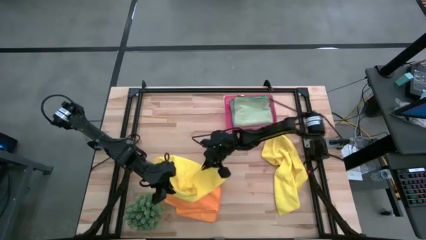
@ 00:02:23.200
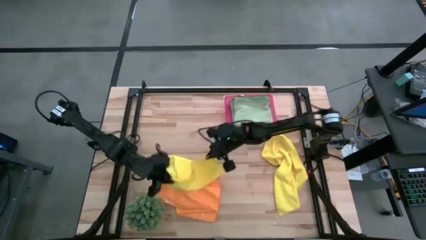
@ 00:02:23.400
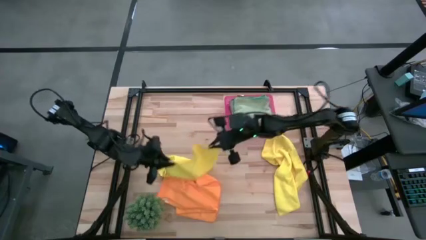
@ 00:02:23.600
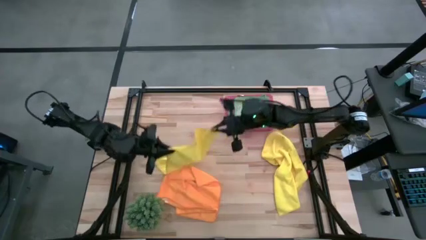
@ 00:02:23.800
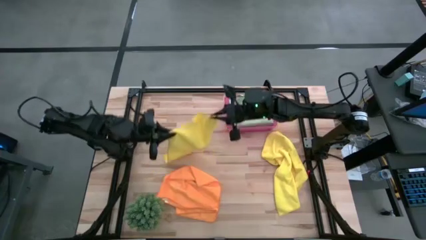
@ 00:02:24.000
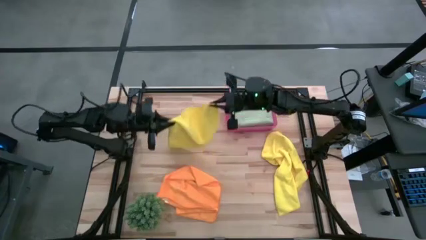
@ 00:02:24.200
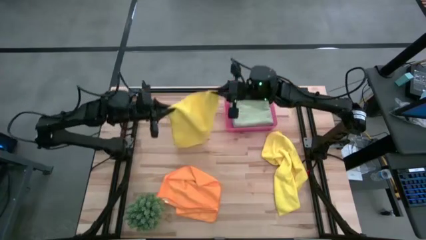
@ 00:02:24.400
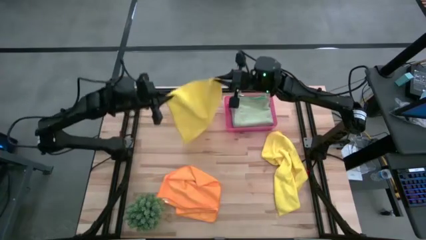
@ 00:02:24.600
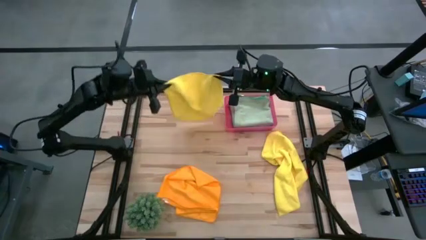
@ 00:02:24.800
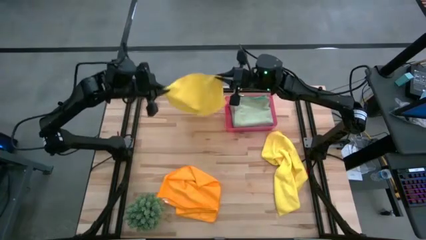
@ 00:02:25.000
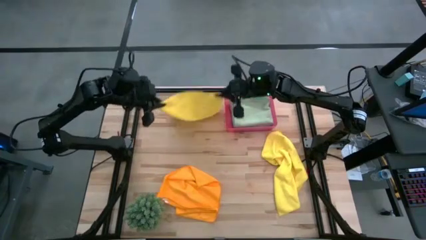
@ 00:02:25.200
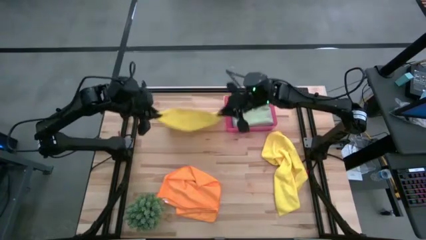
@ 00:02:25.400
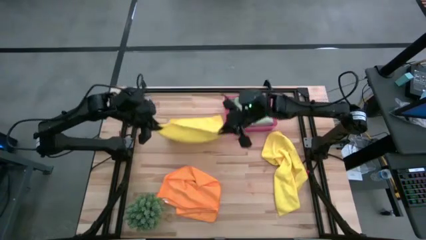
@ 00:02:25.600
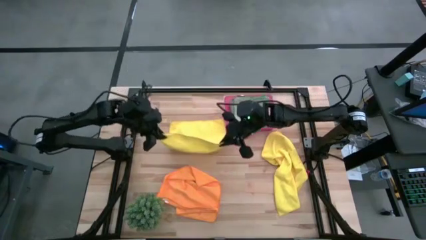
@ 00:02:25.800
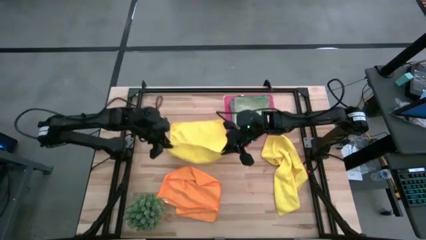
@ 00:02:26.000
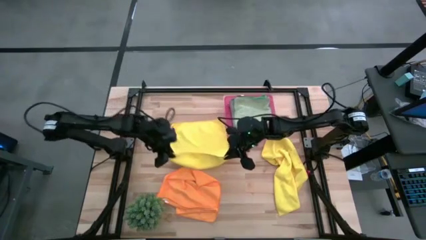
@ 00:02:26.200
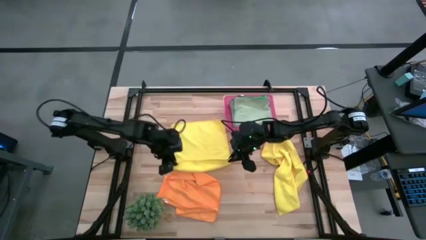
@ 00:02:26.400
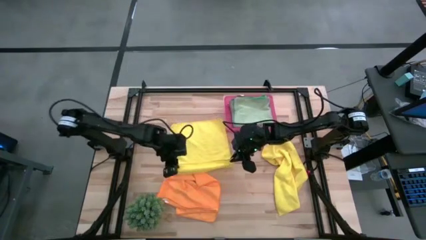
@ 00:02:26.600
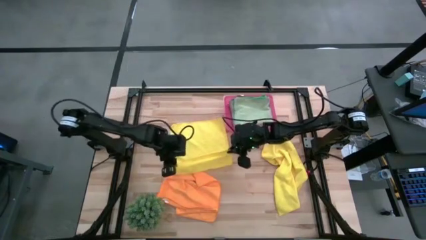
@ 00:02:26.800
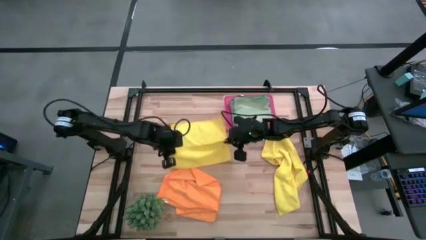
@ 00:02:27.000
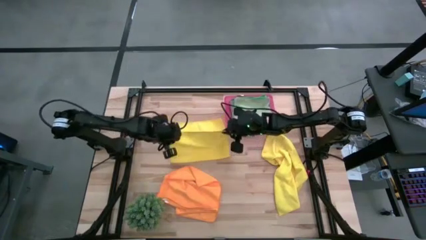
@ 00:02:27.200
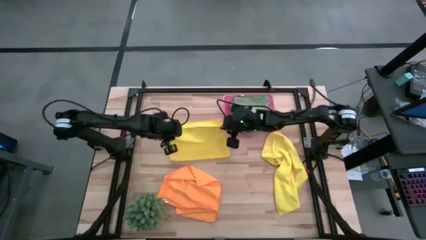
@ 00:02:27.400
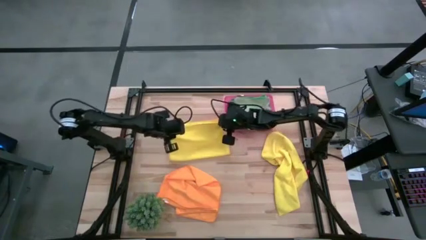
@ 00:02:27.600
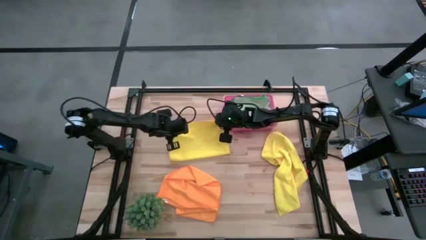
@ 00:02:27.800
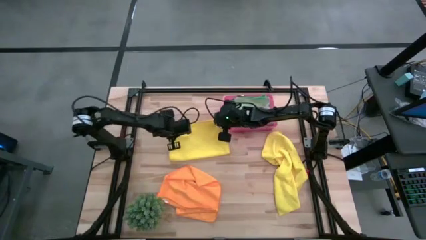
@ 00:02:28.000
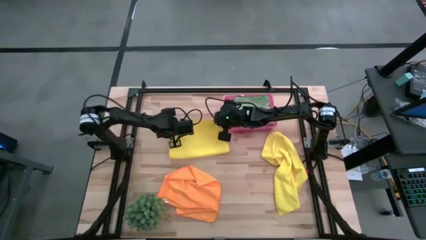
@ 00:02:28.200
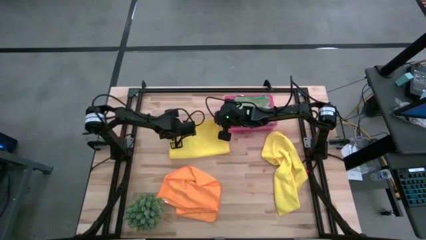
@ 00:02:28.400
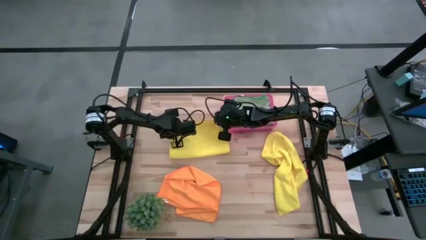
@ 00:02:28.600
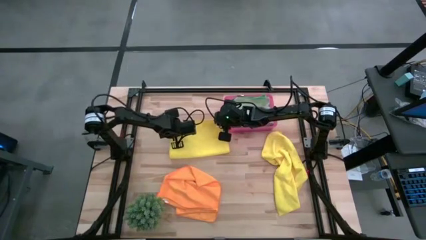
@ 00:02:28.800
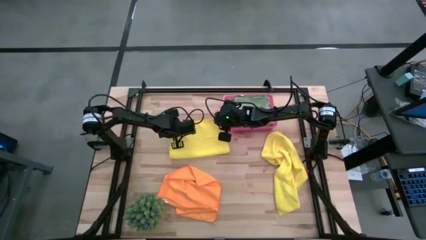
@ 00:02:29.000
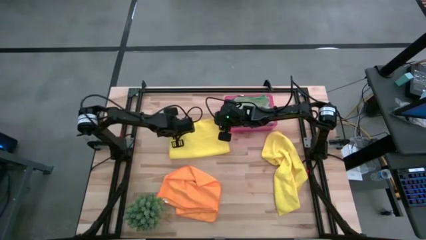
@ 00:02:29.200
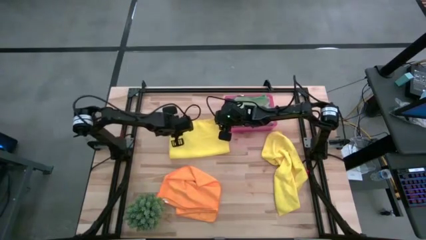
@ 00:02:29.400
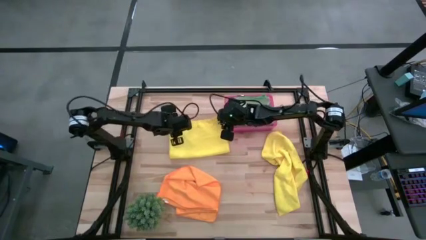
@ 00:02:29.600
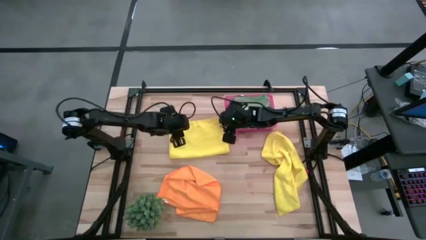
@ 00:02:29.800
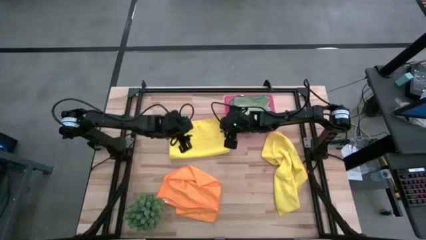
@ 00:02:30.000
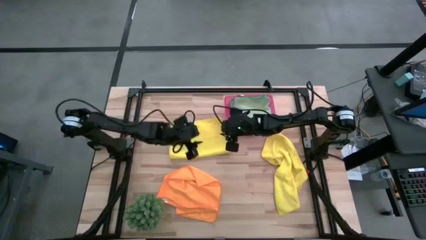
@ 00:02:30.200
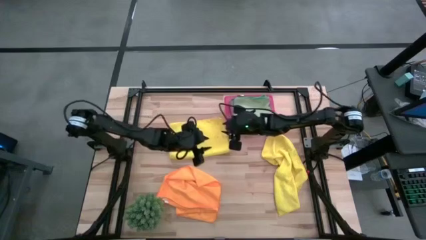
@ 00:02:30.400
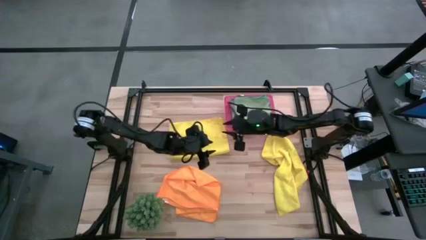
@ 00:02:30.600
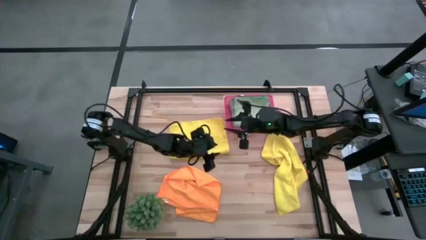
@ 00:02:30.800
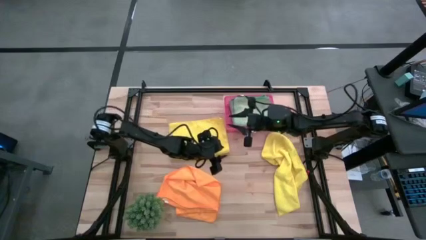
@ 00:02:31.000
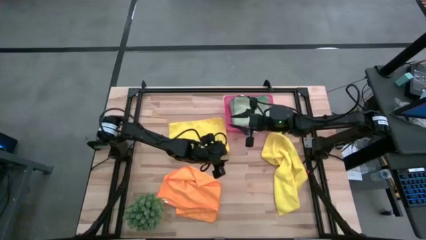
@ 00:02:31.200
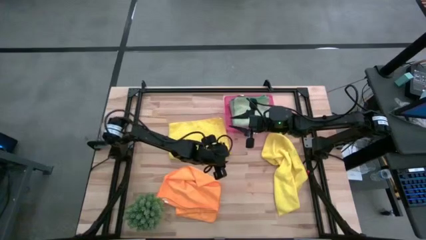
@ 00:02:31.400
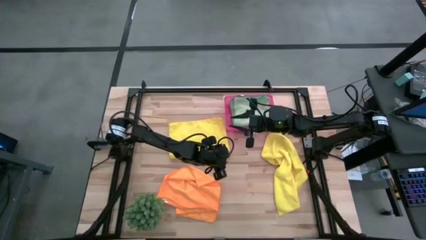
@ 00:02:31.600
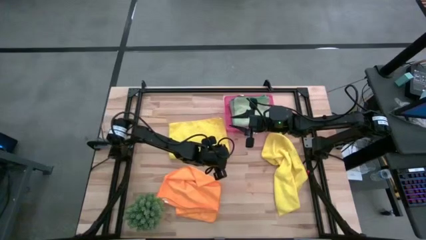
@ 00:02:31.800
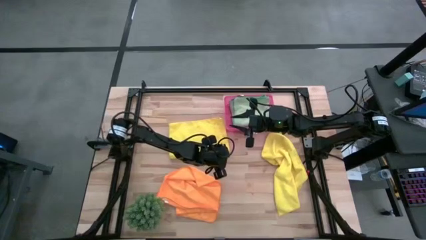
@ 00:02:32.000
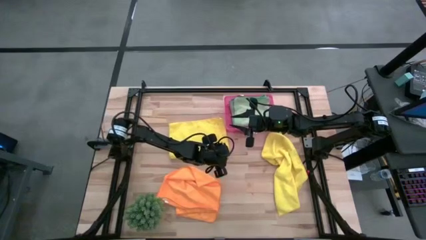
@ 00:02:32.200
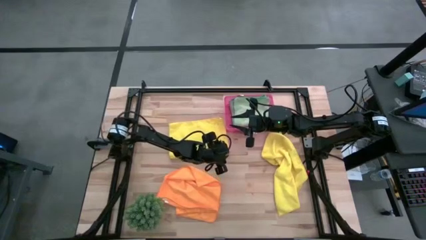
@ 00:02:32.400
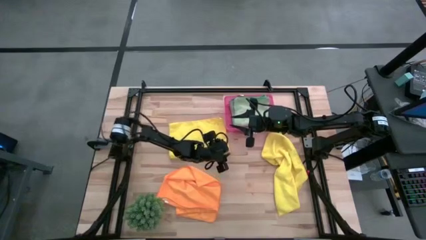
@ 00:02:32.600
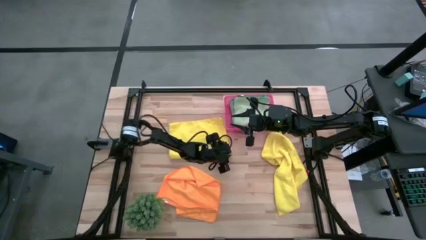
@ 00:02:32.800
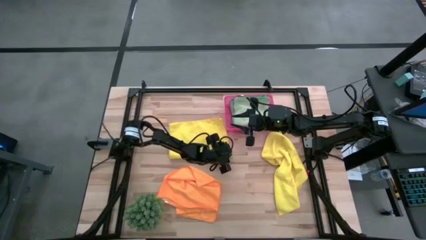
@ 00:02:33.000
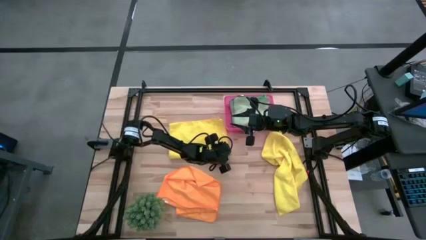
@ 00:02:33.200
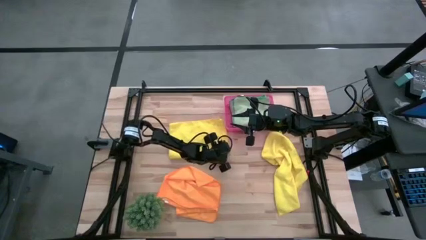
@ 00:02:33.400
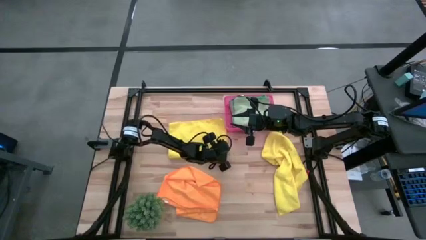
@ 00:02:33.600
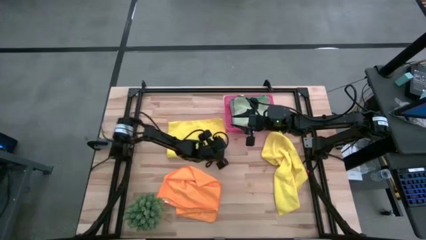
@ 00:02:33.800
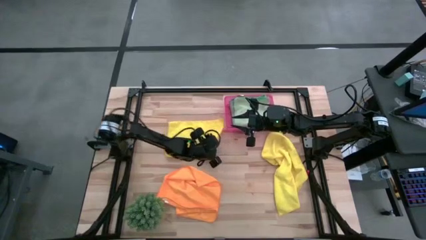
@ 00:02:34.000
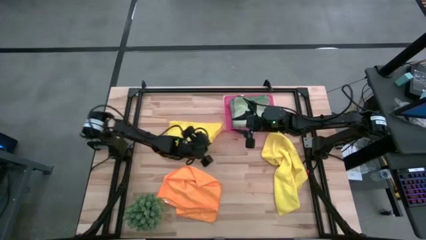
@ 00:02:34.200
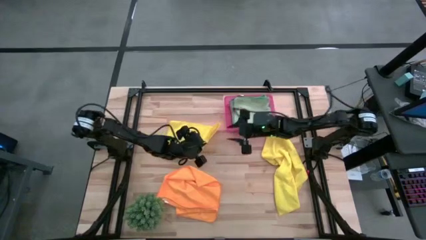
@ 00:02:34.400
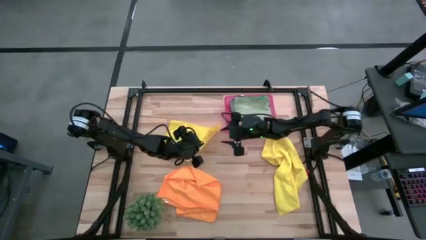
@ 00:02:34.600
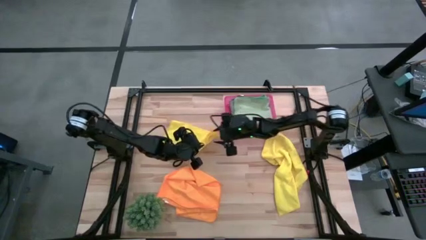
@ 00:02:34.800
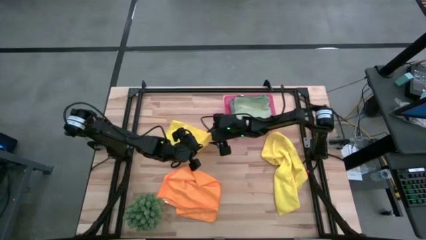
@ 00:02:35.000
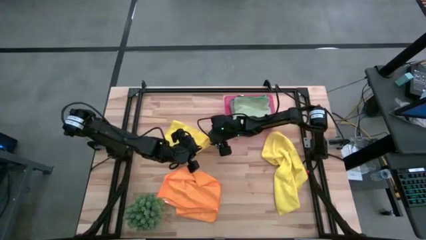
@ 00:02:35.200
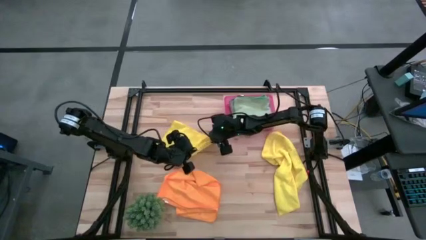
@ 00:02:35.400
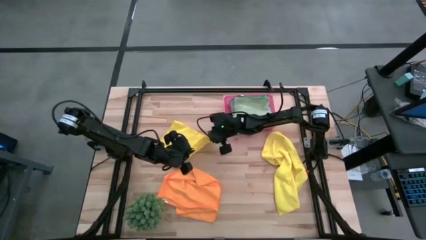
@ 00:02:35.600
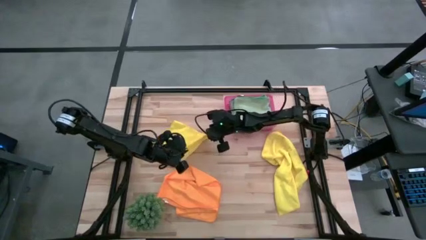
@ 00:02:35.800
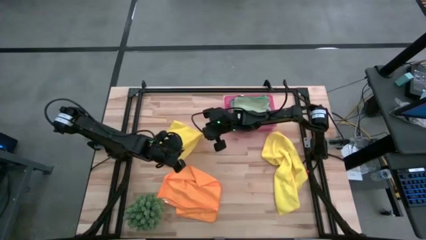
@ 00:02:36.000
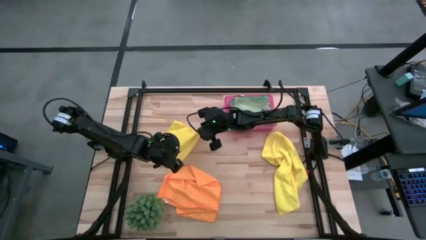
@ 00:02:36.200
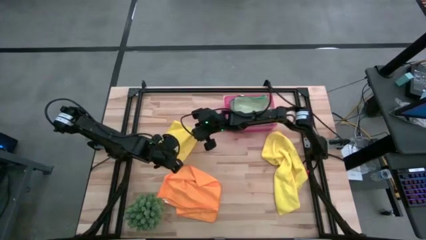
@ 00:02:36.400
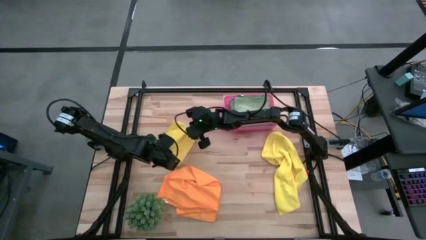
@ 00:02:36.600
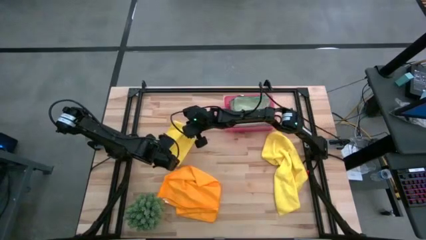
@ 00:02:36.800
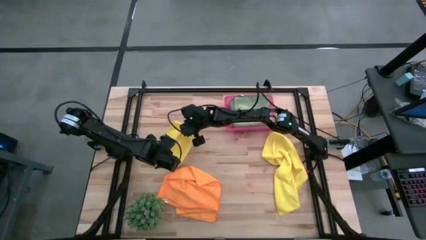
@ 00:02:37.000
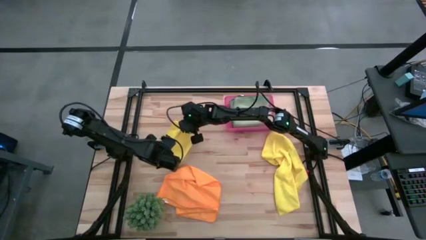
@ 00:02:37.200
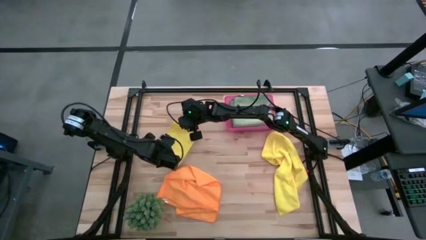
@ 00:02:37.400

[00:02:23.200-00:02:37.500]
Task: Fold microfiber towels
Fold the top yellow microfiber cloth
